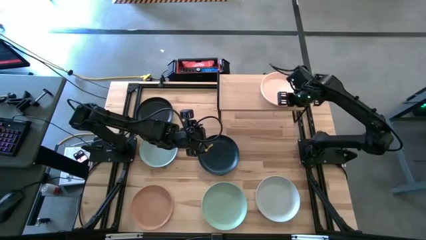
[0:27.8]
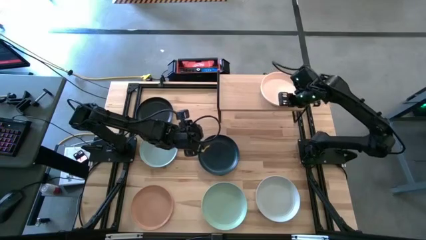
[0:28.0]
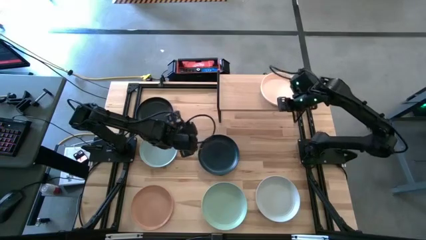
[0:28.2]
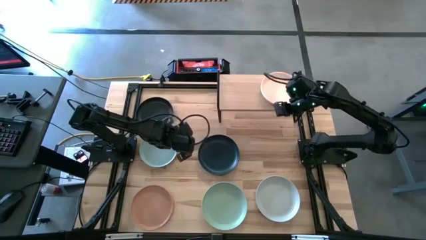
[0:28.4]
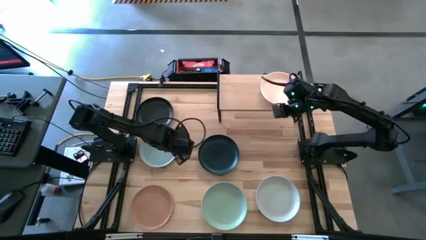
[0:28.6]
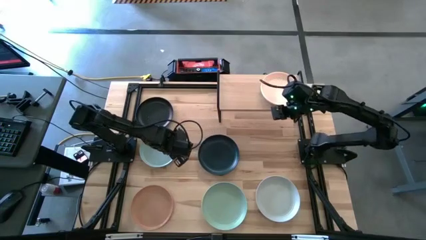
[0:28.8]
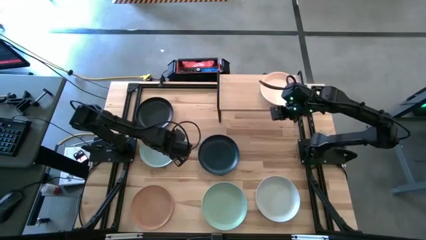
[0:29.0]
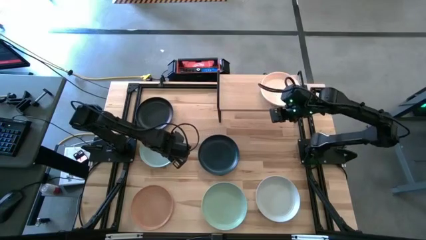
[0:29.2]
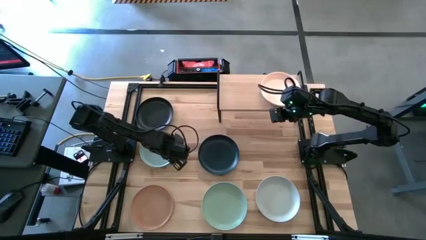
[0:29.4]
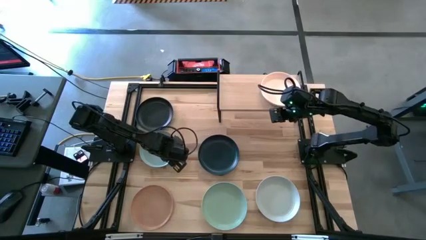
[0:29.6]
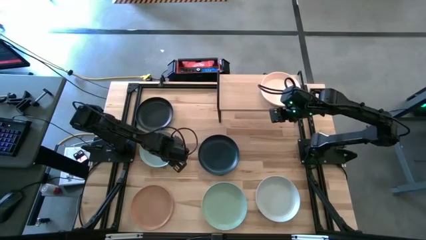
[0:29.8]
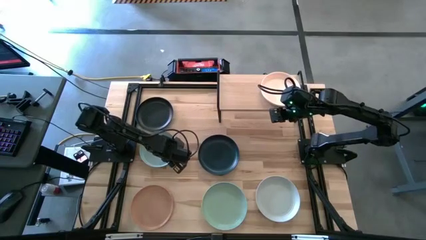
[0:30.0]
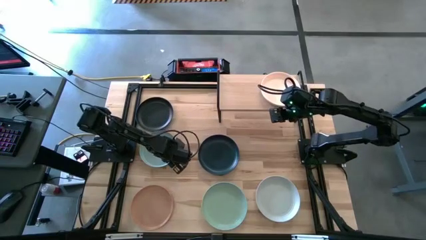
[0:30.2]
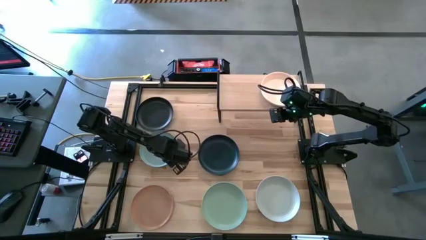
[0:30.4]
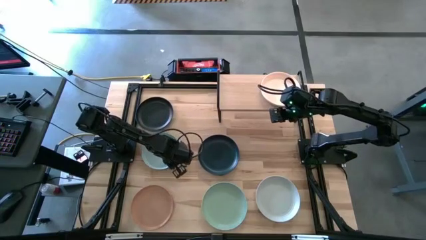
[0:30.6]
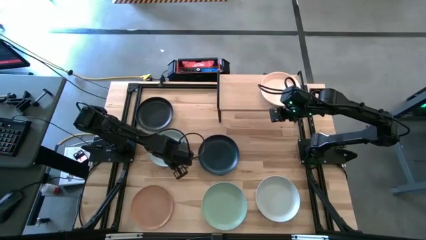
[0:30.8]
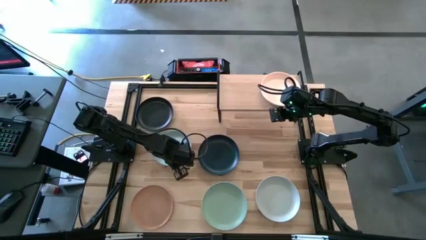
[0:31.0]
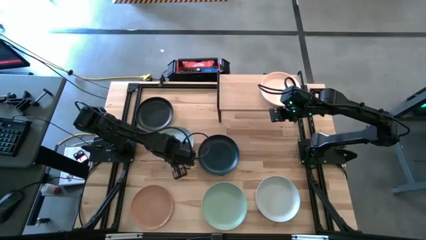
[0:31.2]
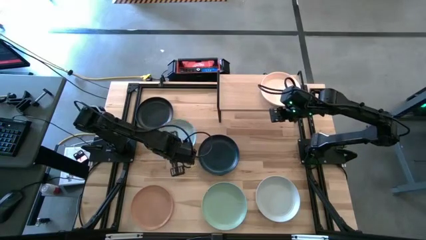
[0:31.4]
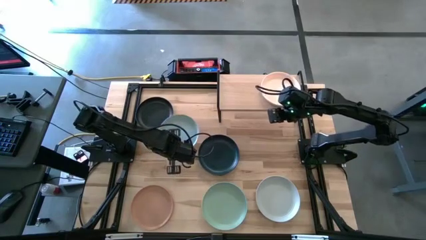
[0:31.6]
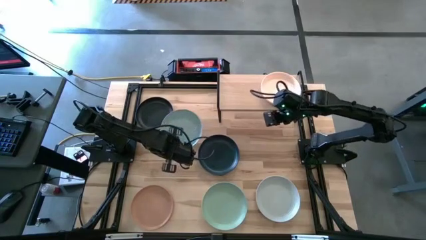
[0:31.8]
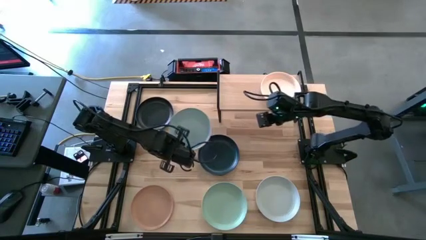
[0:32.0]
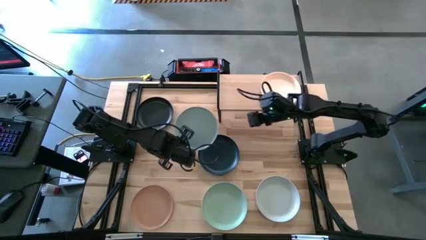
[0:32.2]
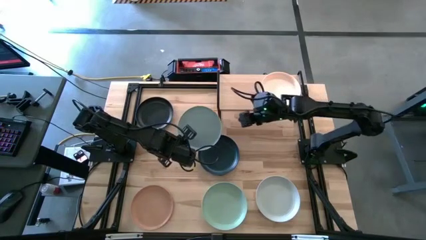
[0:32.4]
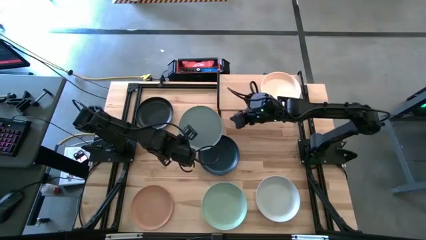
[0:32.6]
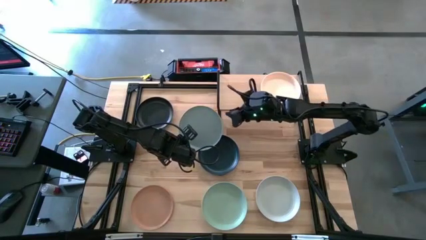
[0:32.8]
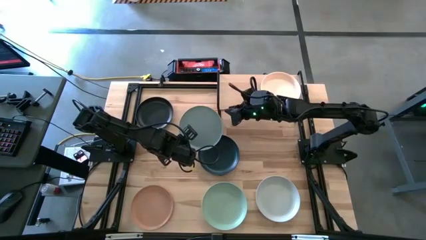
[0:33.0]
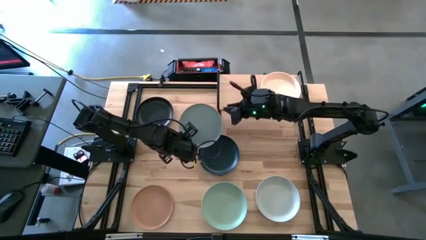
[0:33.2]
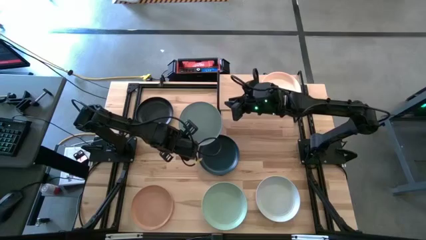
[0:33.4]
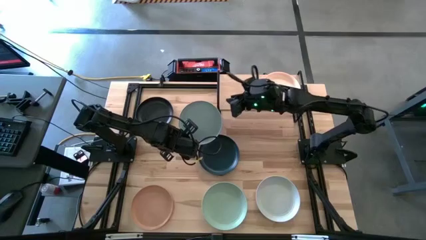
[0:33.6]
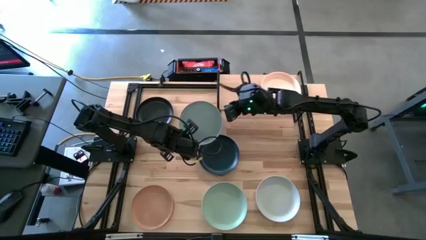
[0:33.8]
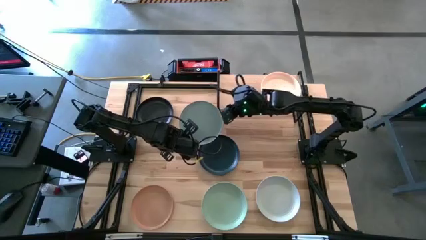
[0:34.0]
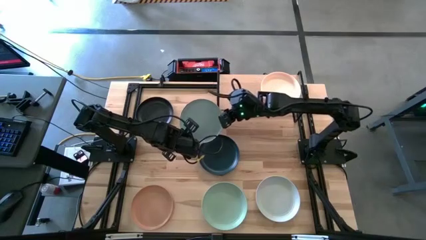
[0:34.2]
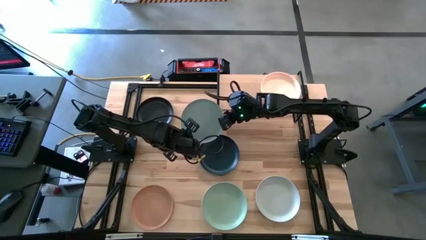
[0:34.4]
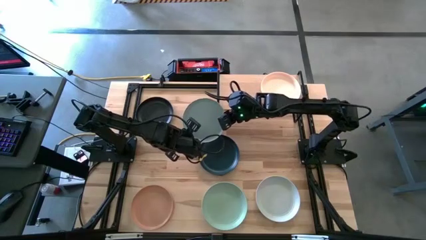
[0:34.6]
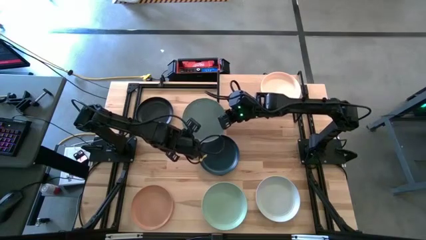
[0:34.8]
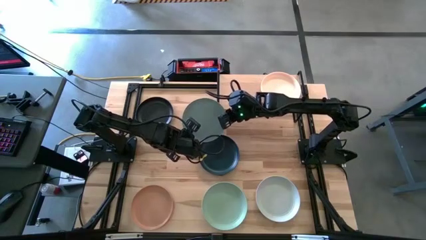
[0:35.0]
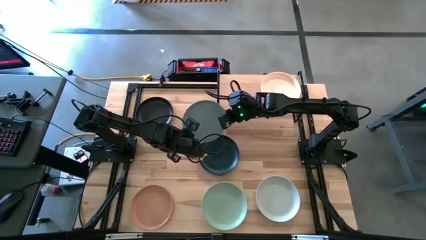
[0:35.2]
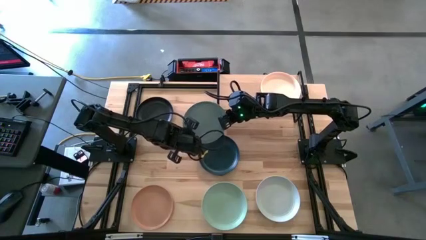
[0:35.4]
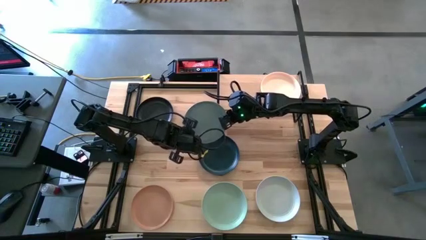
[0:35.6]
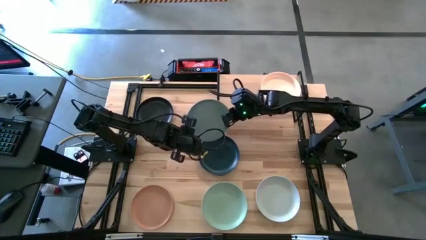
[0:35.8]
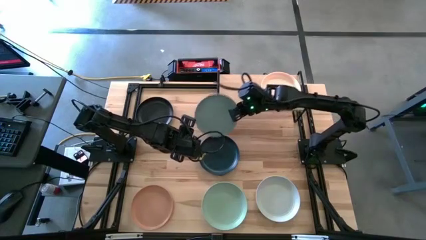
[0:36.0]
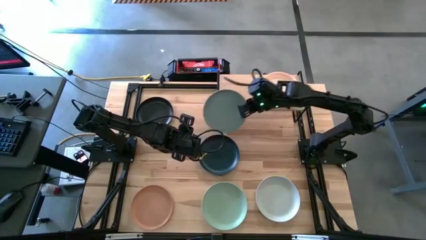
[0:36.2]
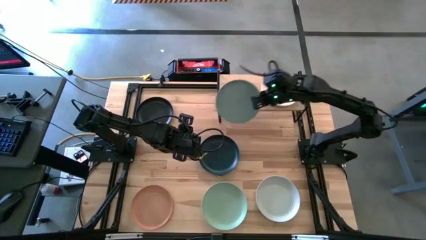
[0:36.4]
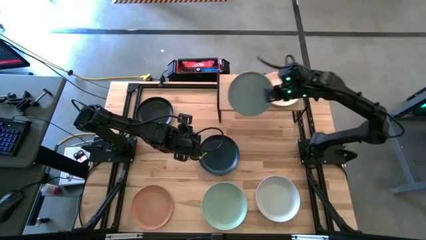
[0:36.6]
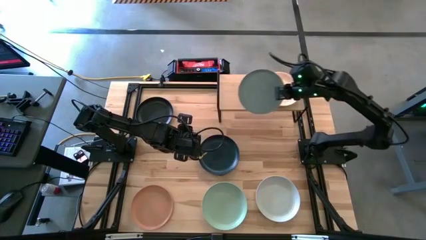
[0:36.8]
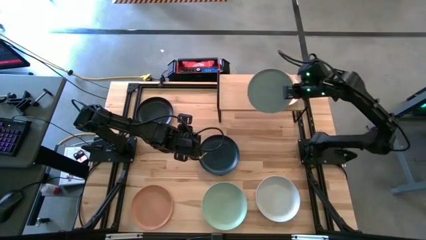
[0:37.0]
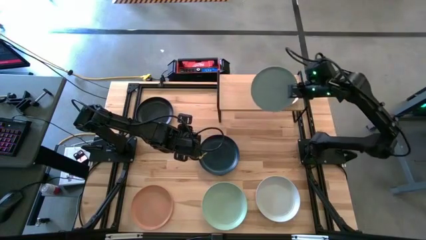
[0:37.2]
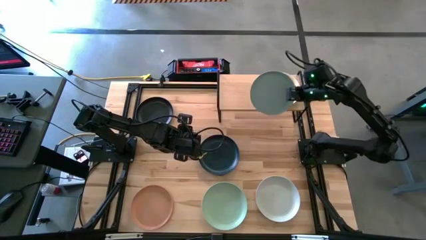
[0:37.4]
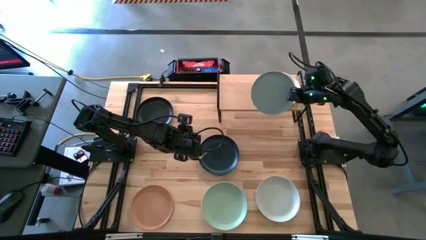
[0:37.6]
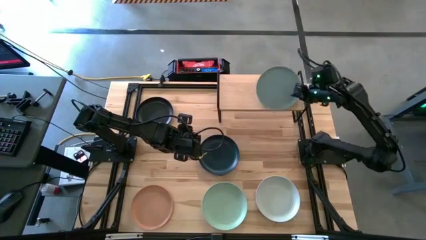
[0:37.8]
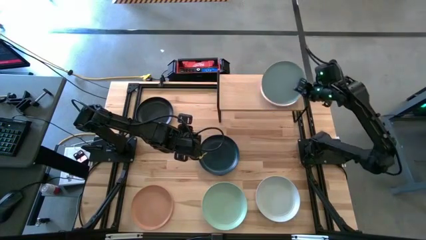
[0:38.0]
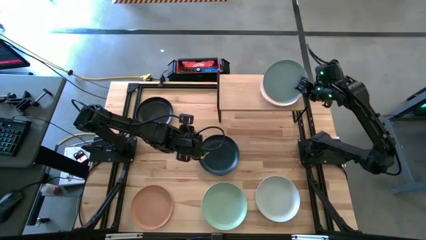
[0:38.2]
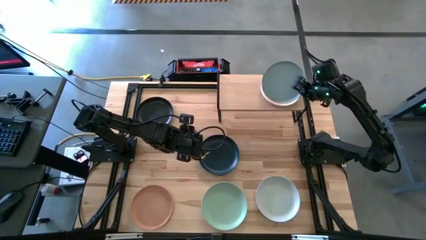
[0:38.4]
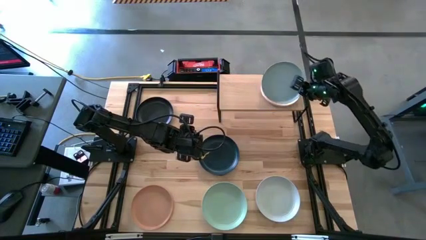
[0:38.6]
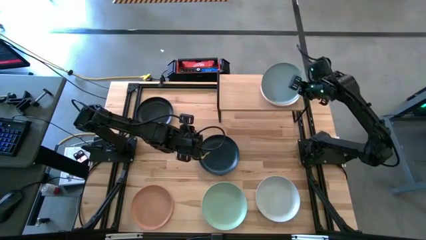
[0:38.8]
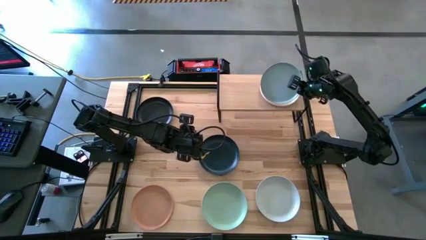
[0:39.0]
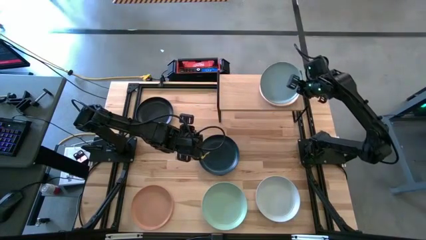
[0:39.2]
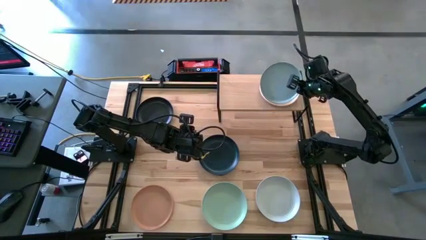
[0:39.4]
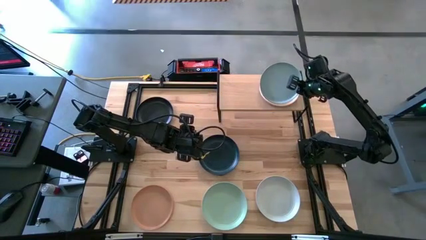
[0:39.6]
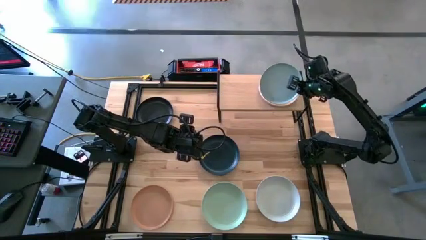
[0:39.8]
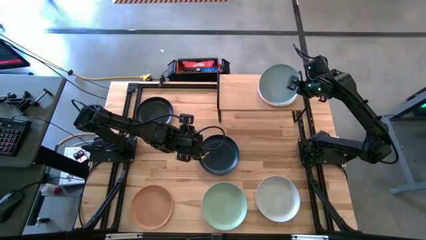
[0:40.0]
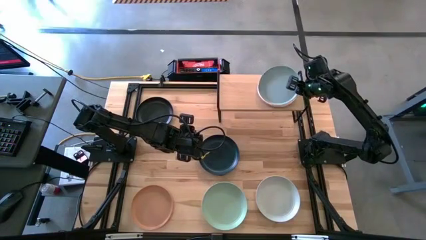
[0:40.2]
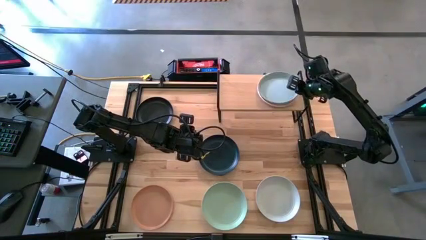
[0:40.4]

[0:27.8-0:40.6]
Task: Place and stack plates onto a shelf
Stack the blue plate on top of the orange plate on the shelf
